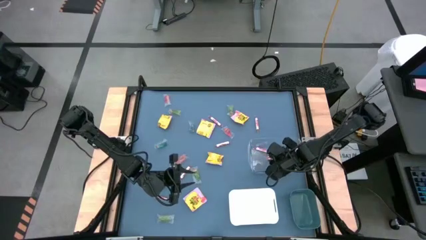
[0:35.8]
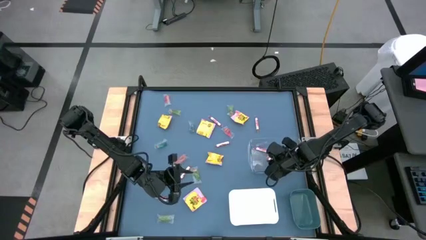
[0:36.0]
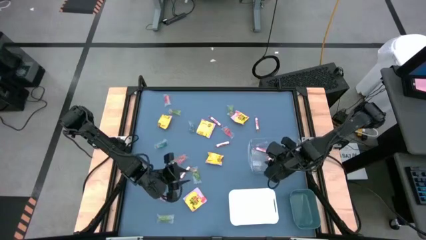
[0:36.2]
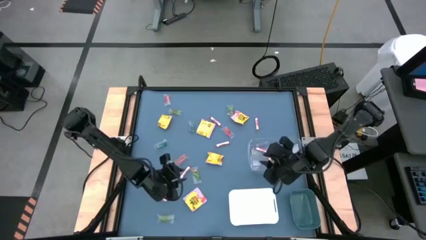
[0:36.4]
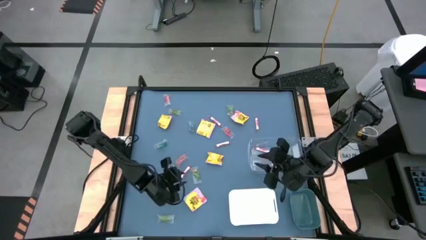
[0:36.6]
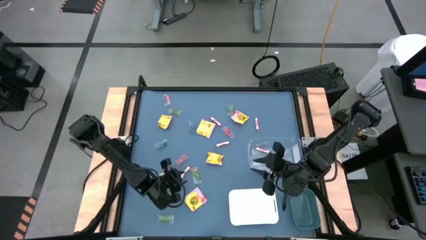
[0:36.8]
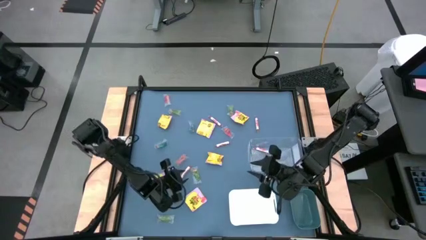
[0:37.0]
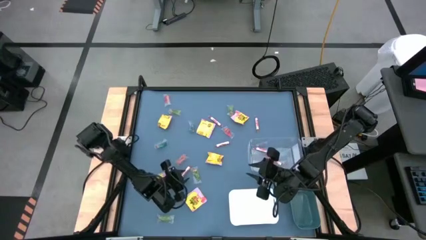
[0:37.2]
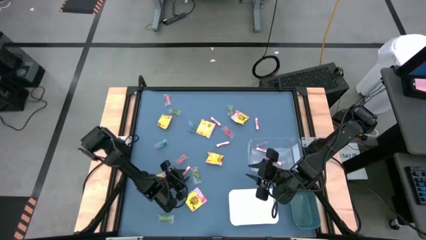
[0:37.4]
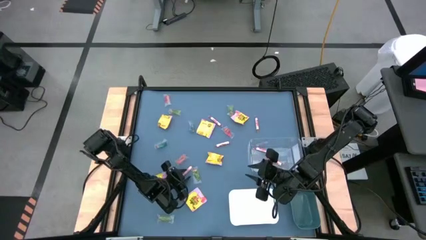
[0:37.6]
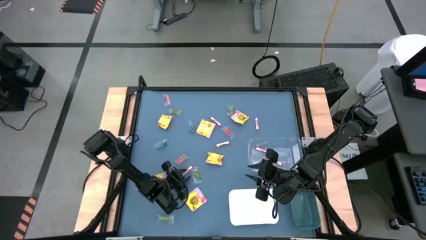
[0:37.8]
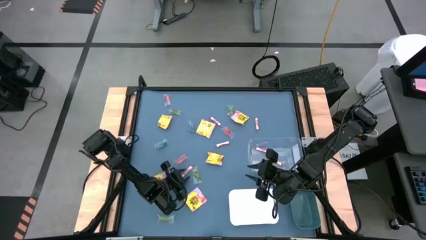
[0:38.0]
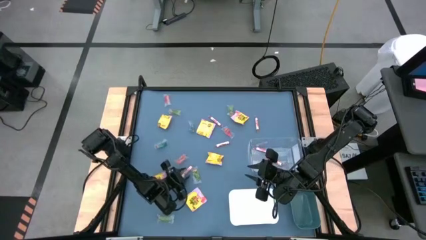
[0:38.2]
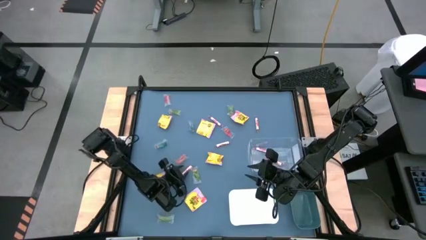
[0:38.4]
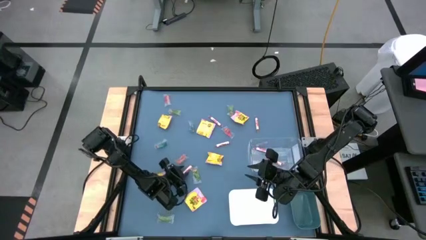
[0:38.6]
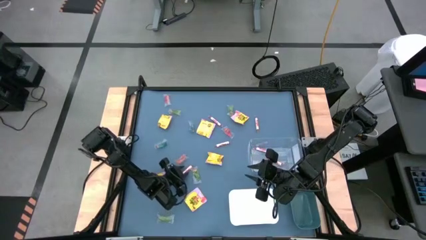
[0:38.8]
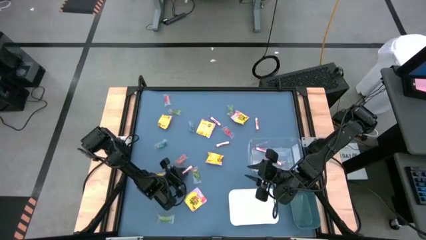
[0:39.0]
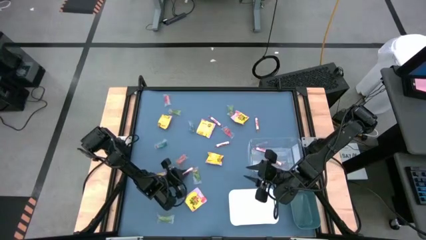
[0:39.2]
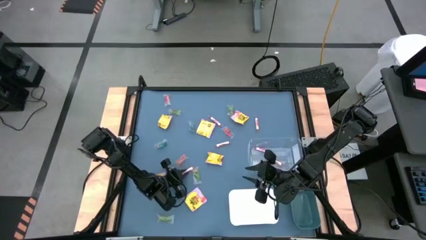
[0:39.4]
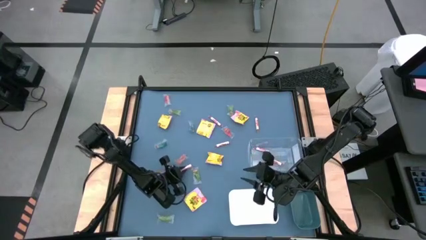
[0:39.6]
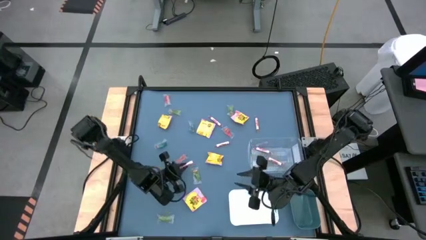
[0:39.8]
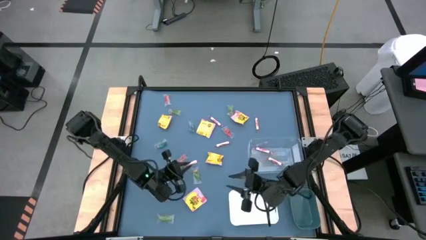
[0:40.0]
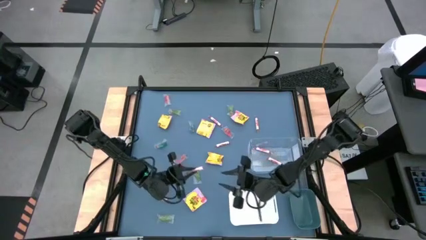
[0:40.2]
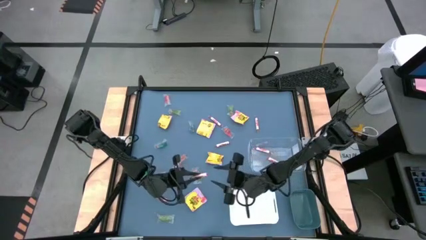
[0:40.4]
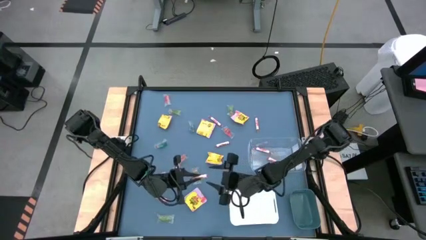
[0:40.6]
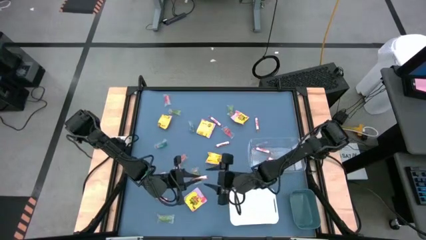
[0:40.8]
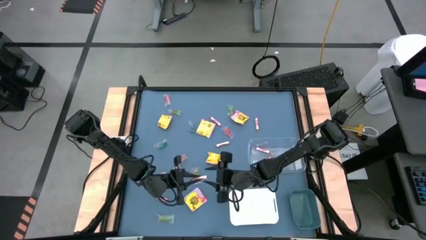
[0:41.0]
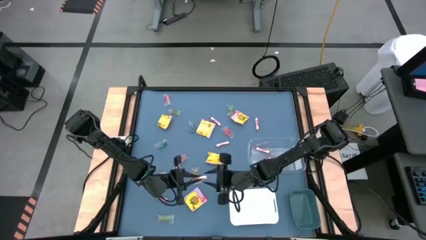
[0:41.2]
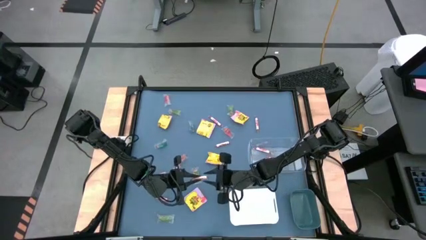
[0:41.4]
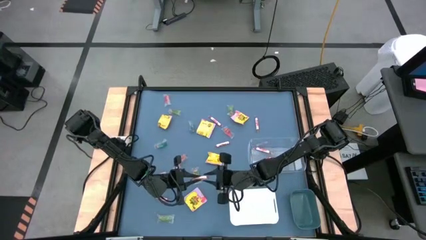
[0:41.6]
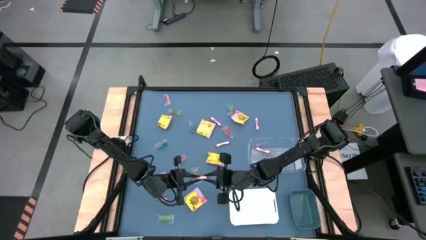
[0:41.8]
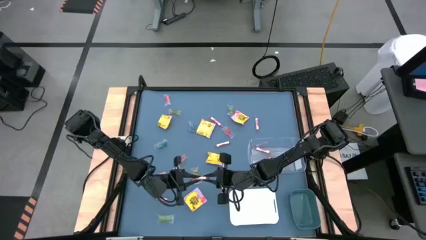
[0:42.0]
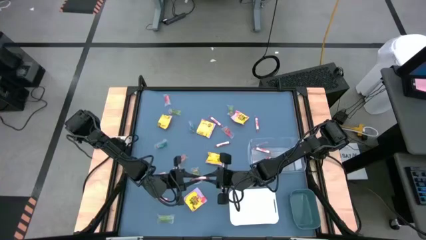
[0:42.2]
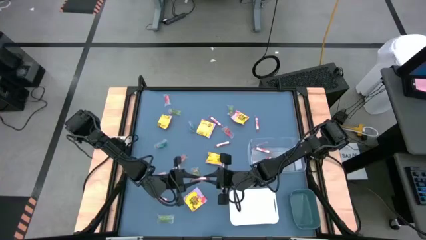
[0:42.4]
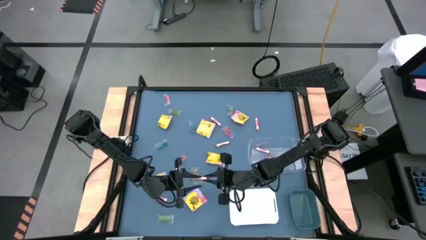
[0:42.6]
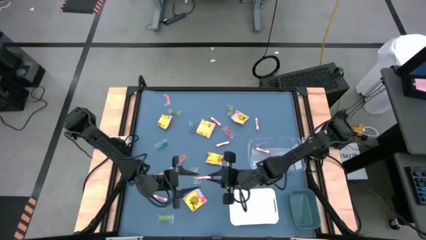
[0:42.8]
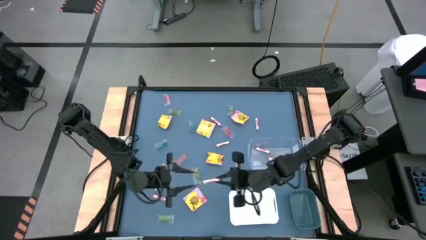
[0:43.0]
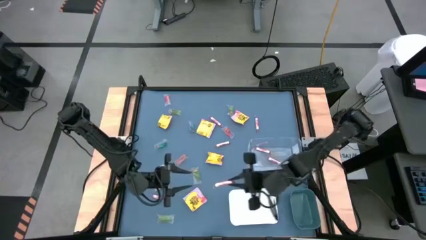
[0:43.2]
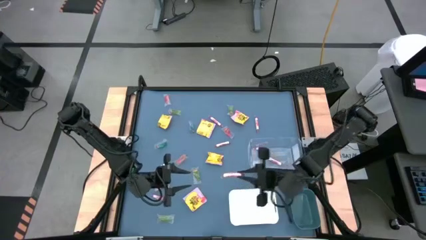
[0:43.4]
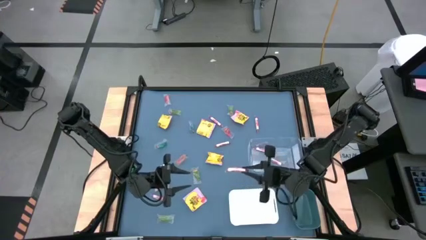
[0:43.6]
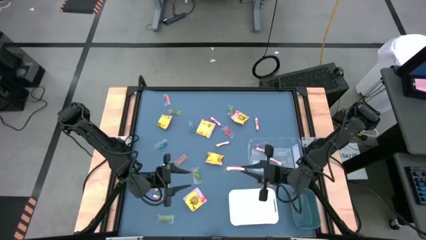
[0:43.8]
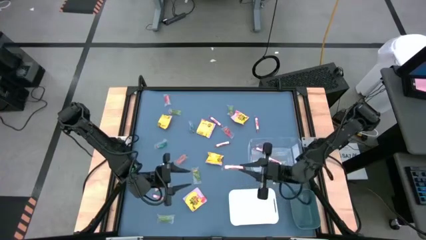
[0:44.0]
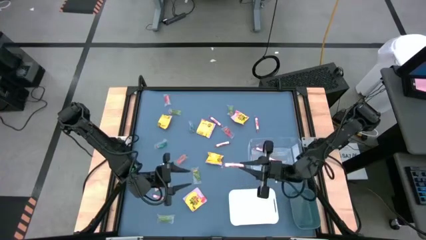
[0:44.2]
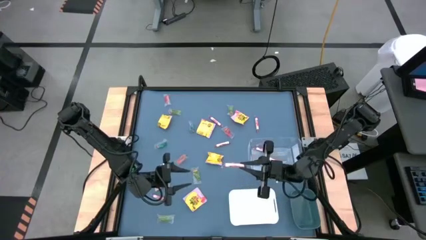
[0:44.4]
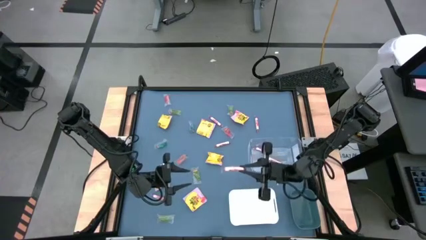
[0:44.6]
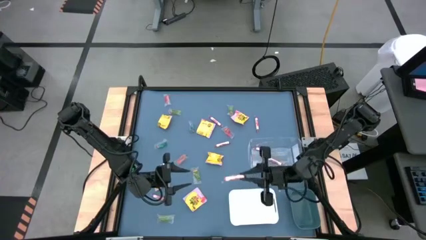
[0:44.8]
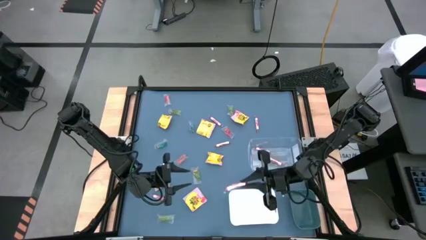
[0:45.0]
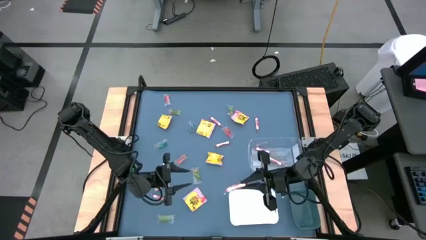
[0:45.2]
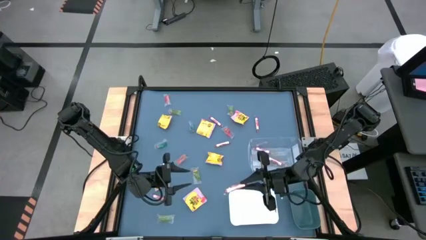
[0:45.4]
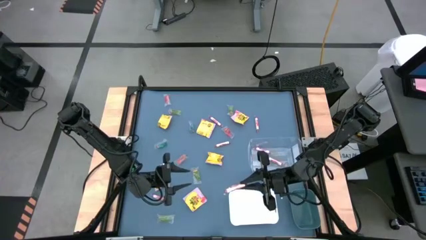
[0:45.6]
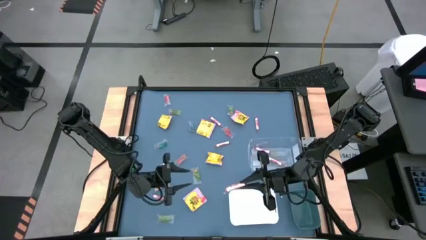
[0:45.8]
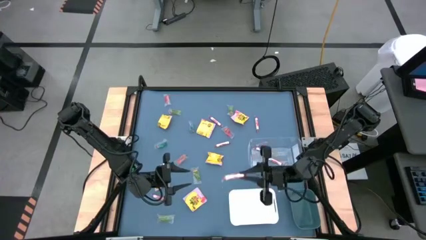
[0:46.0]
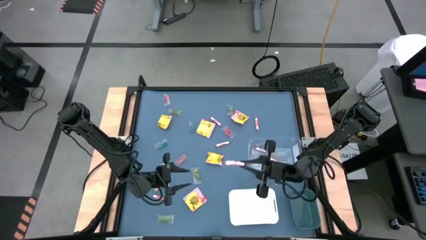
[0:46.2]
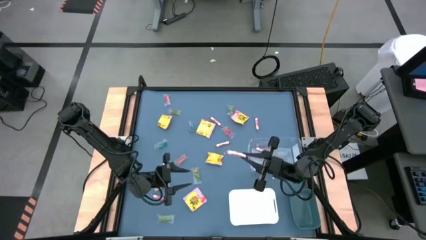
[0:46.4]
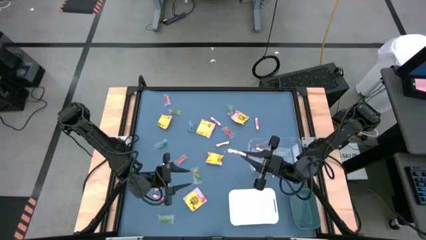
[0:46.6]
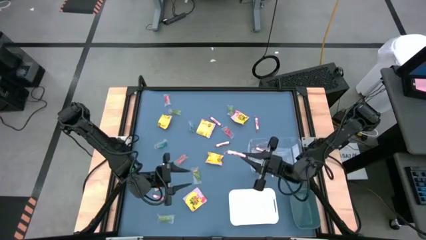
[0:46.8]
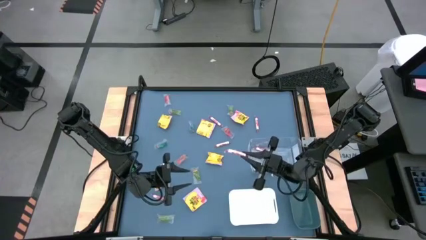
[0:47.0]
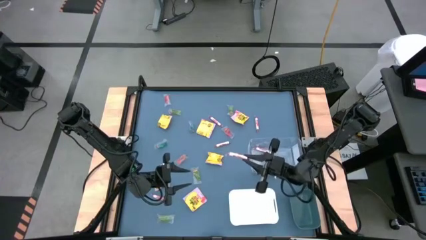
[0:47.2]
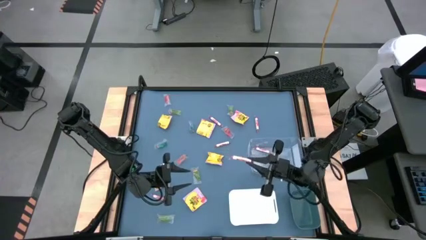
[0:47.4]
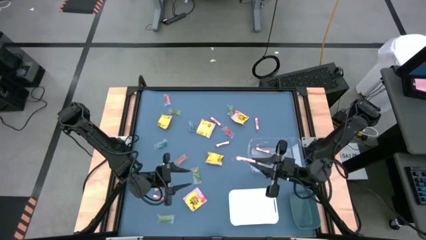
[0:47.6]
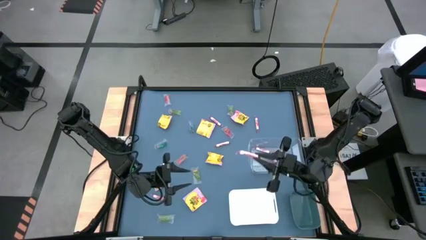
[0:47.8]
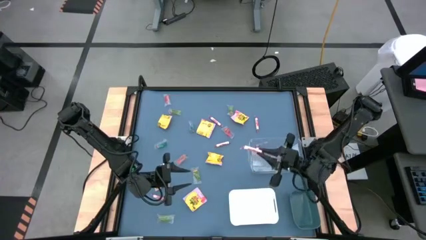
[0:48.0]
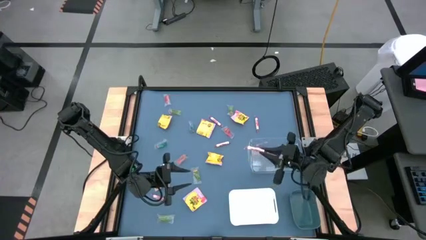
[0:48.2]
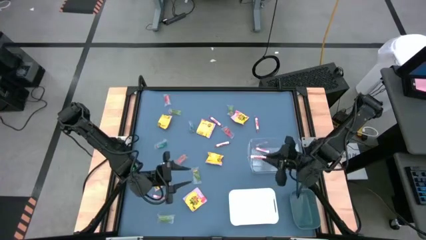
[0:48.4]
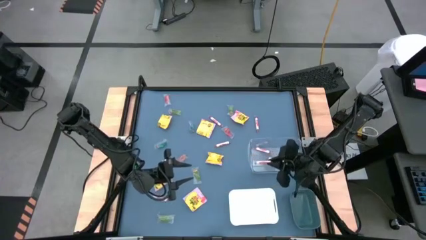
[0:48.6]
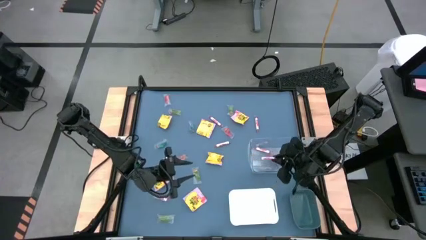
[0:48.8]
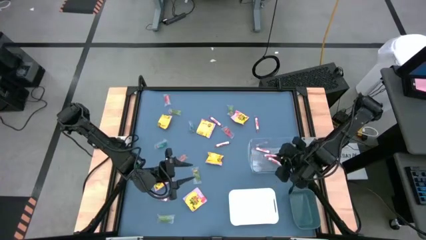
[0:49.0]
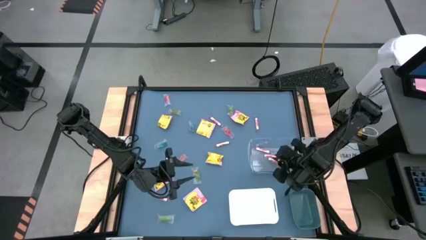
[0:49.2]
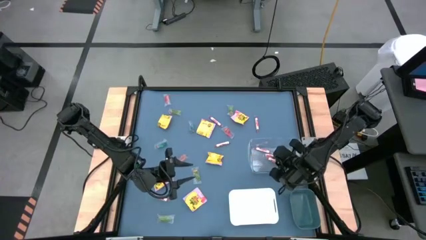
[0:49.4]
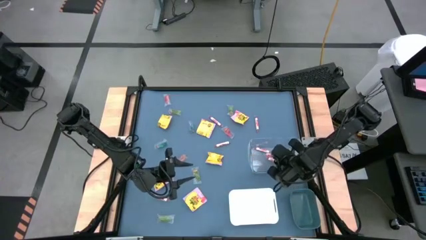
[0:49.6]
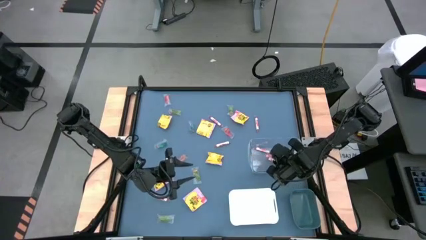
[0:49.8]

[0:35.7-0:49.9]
Task: Sort candy
Put the transparent candy roll into the transparent bin

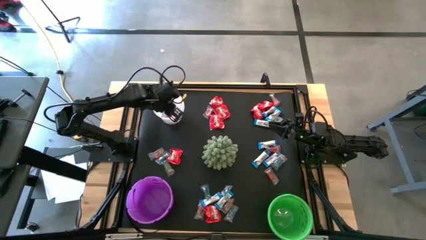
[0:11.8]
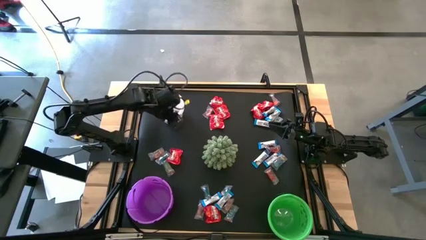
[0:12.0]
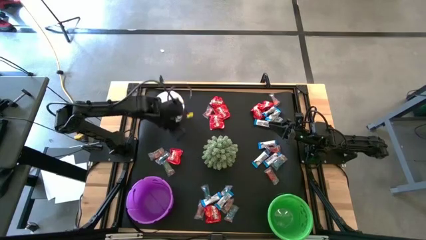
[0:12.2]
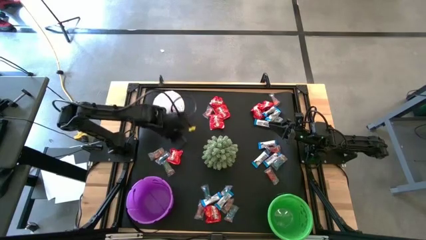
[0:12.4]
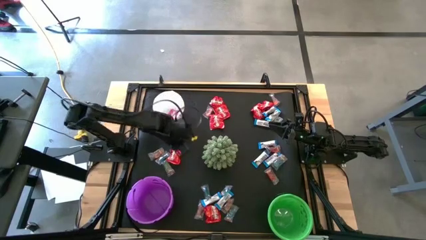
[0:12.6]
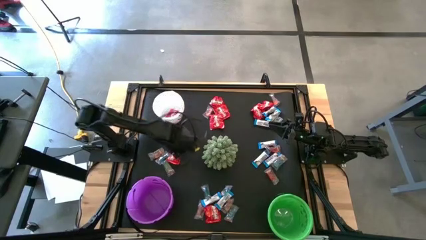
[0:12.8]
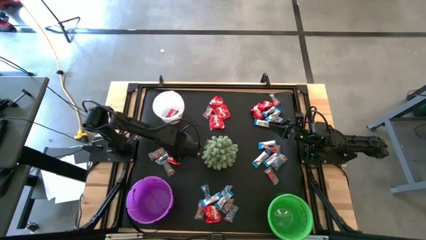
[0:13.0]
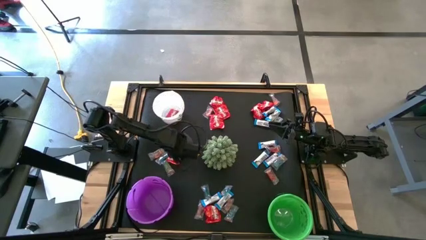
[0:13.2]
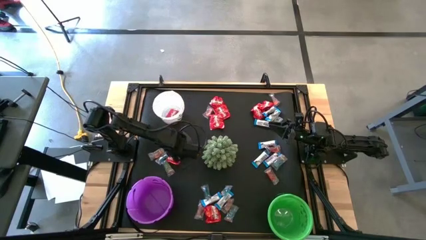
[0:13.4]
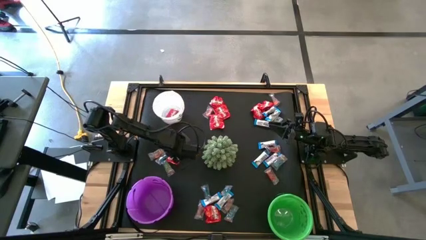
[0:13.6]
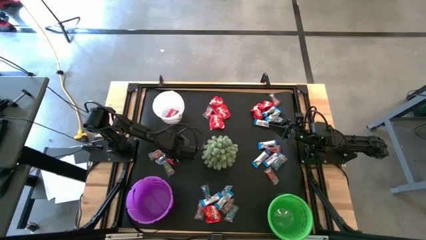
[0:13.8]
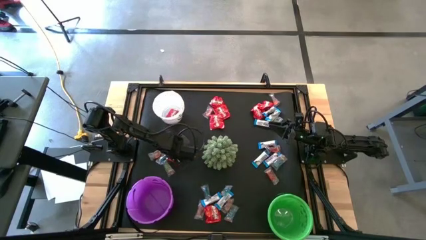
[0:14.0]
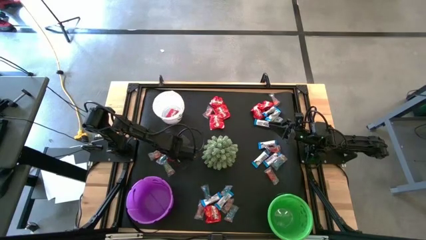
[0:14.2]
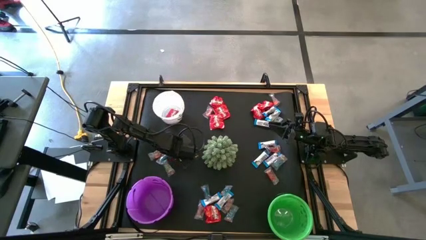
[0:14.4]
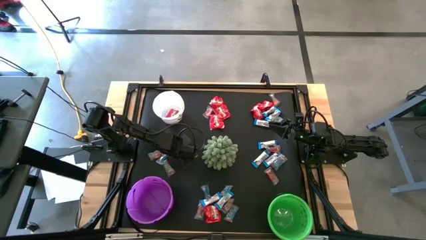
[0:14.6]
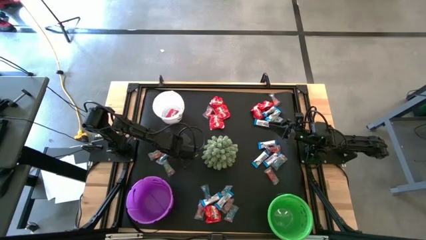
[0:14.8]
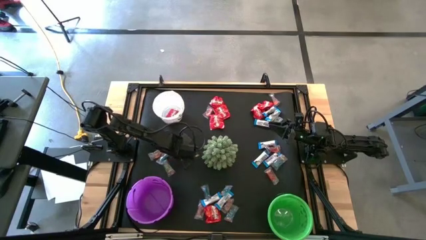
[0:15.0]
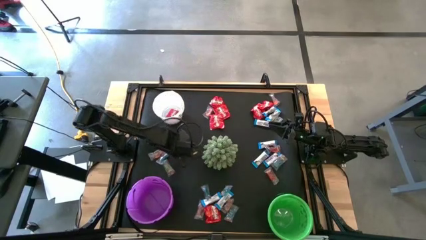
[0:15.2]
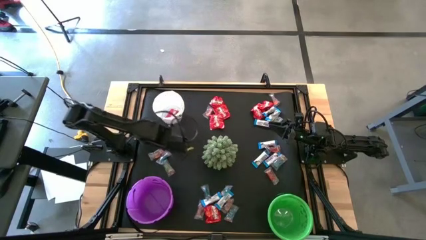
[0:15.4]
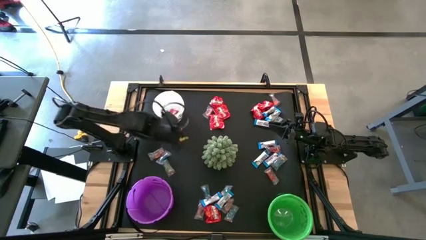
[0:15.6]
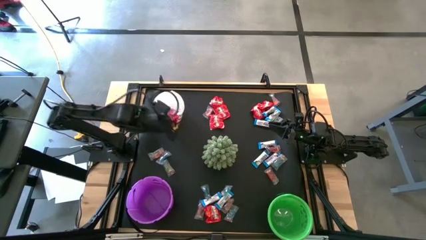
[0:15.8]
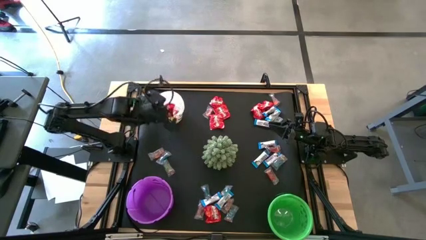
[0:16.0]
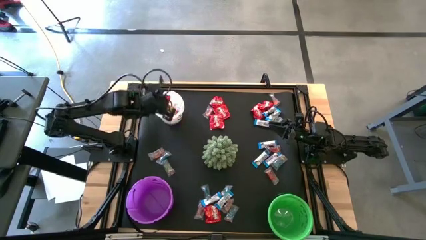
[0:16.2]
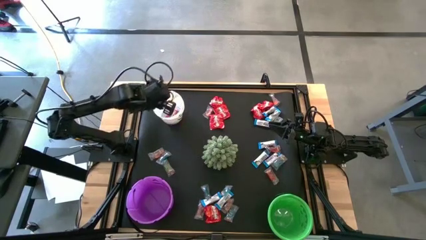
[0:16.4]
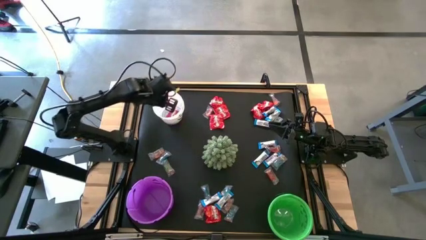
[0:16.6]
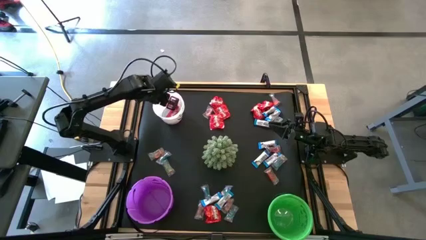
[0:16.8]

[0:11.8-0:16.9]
Task: Organize candy in baskets
Put the red candy into the white bucket
